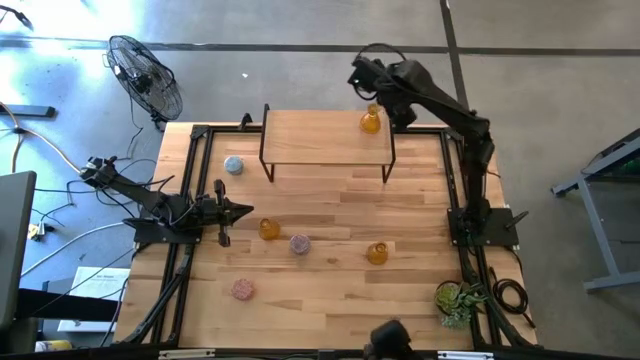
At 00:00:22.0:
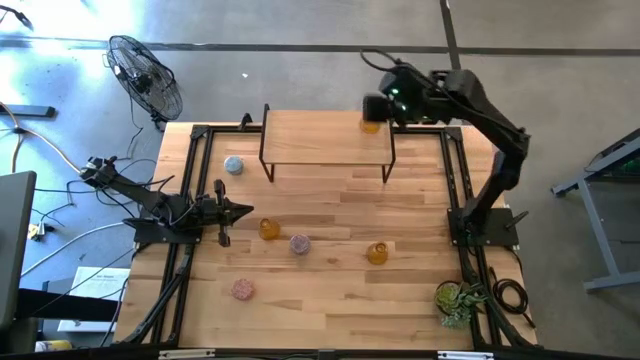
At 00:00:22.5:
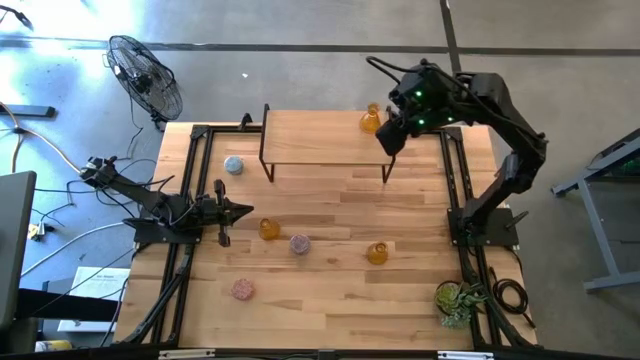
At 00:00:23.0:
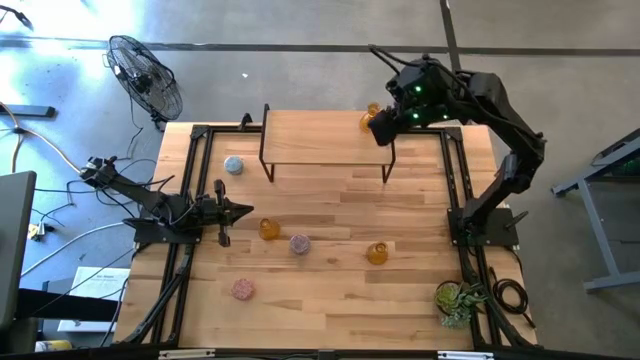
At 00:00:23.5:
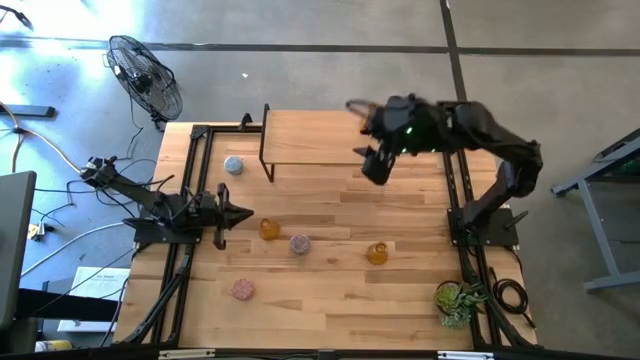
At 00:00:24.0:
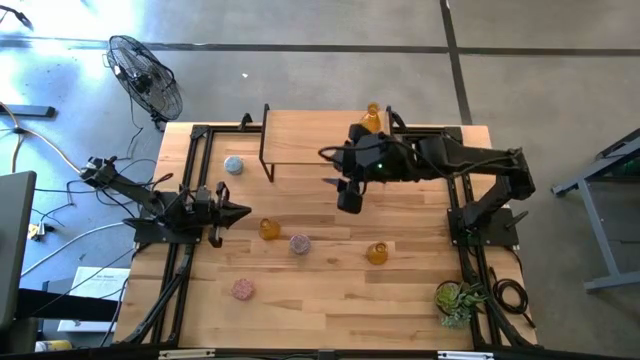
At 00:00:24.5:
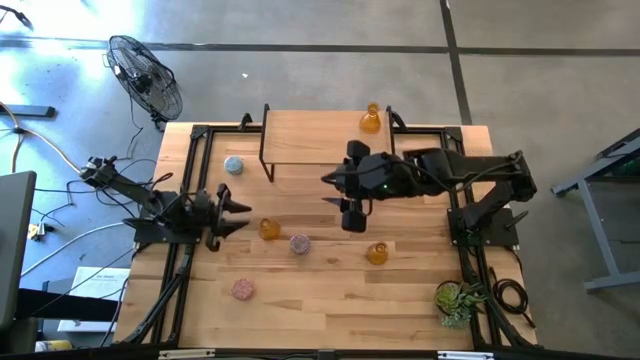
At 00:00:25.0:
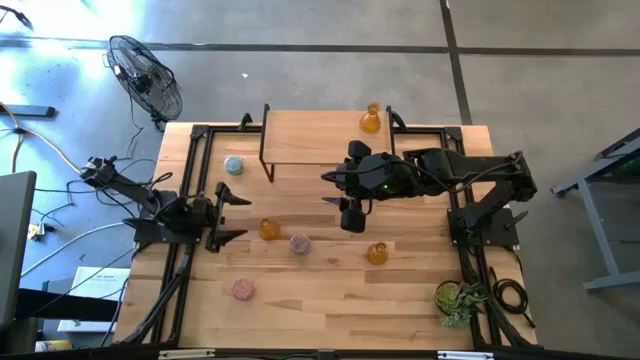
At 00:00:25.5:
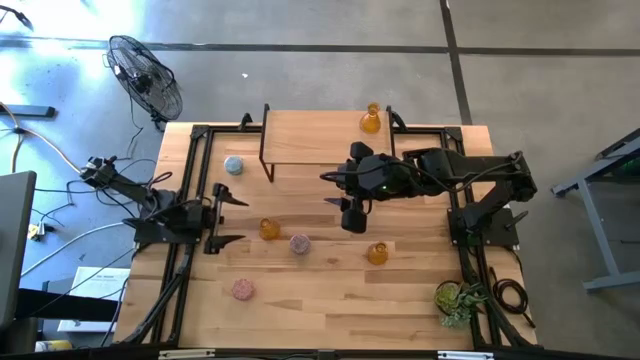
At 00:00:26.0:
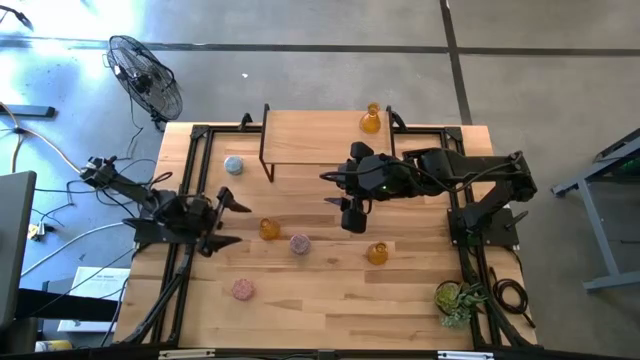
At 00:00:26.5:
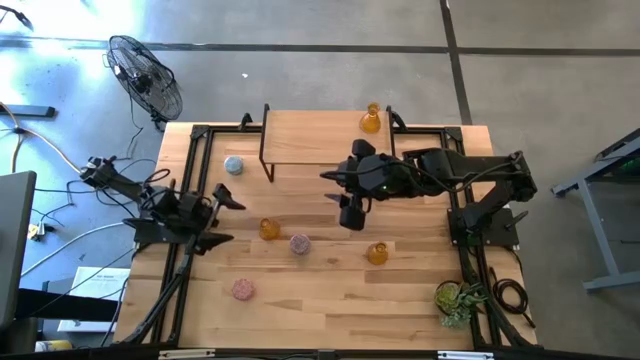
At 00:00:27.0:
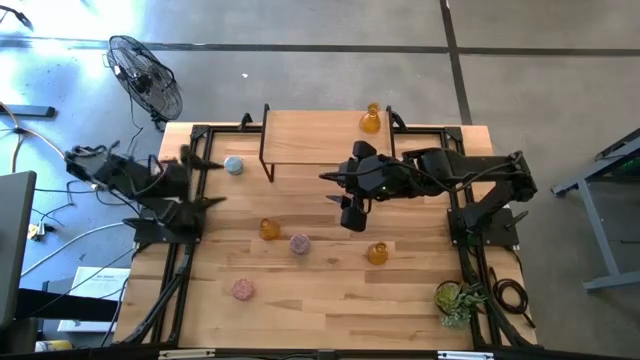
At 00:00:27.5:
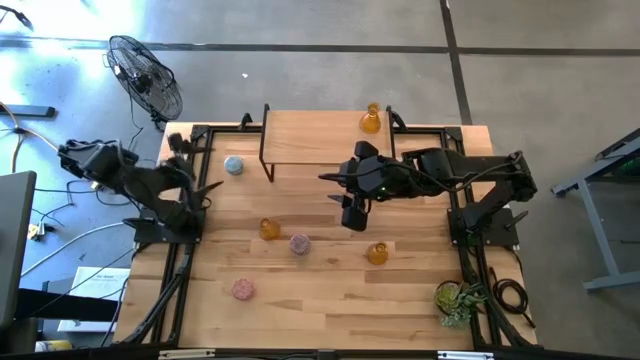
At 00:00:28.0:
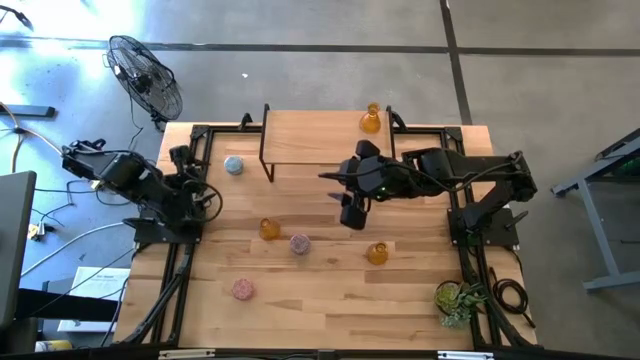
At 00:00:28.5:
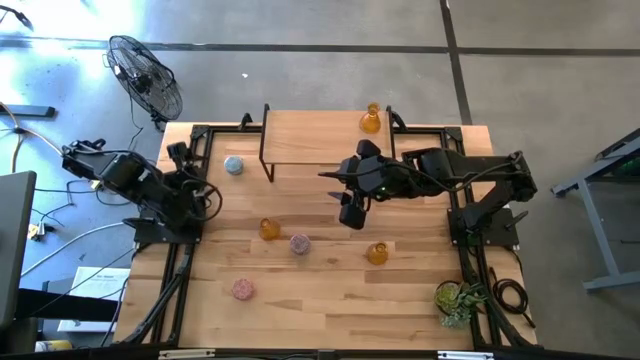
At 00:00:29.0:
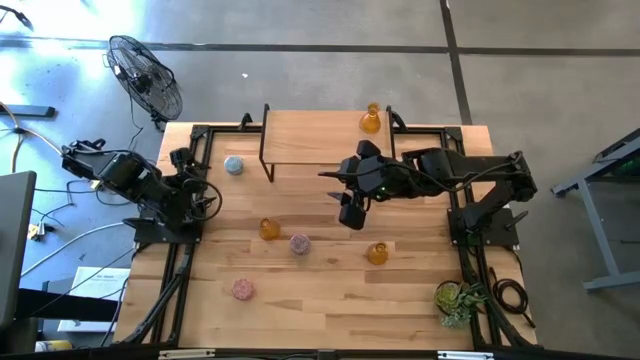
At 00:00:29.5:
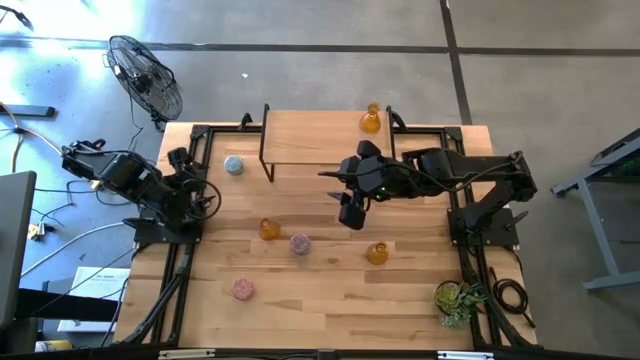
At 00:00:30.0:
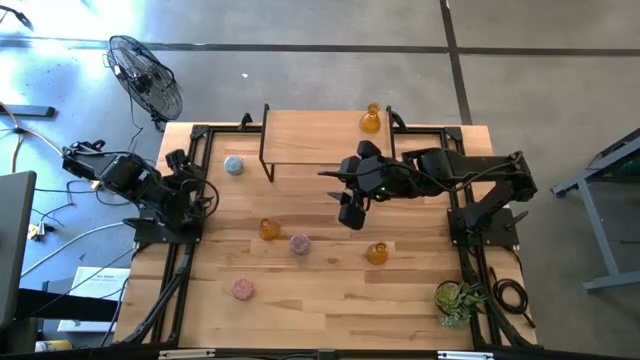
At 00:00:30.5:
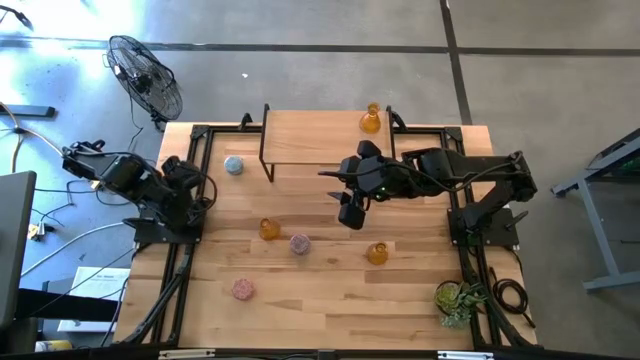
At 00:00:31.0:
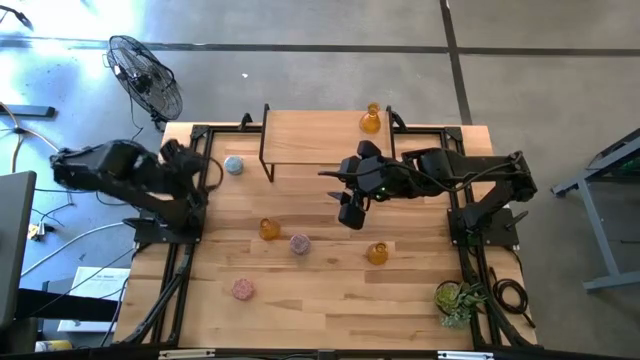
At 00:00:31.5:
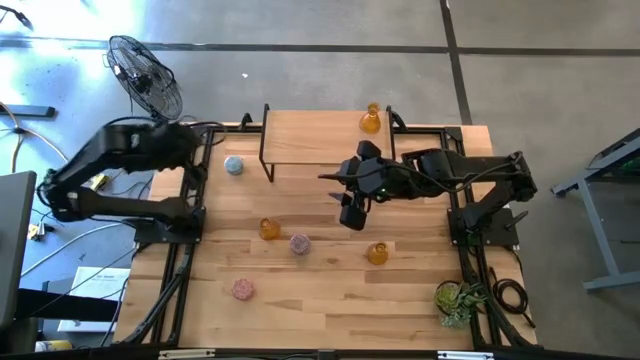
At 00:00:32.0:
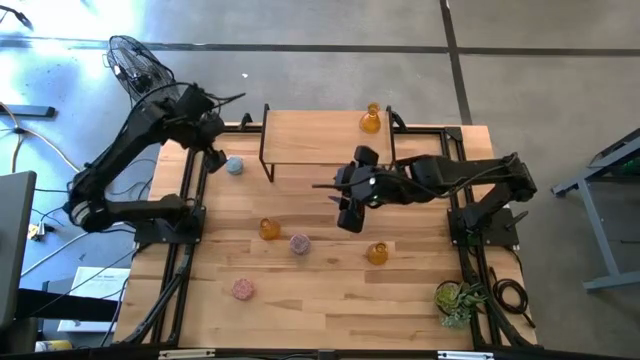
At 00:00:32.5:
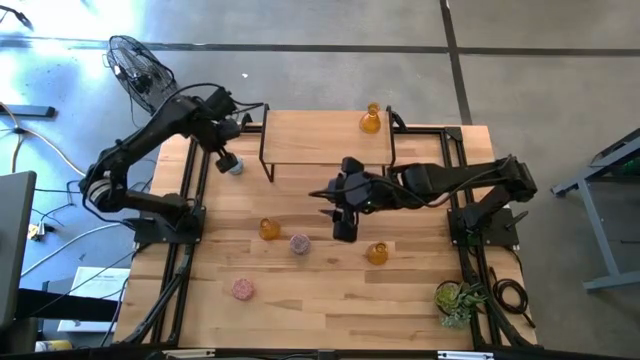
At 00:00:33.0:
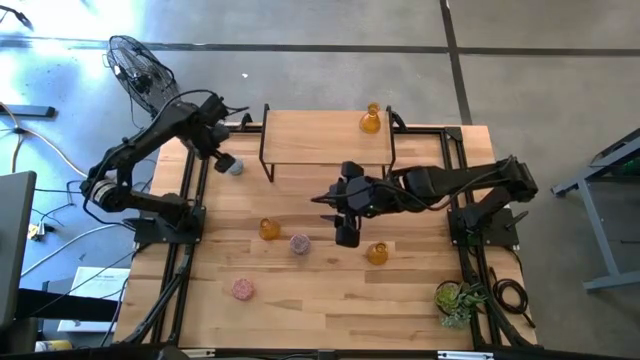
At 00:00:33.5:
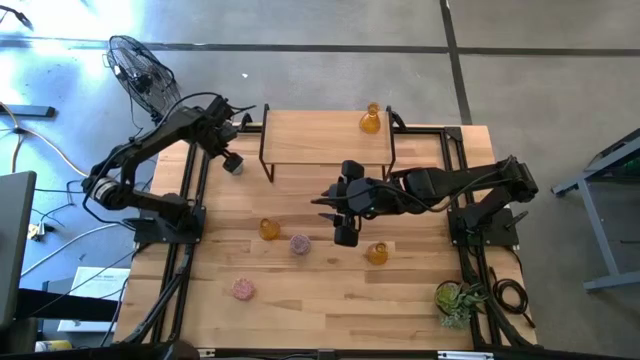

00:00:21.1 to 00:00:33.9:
Task: Pick & Place candle stick holders
Put the blue patterned candle on the shelf
